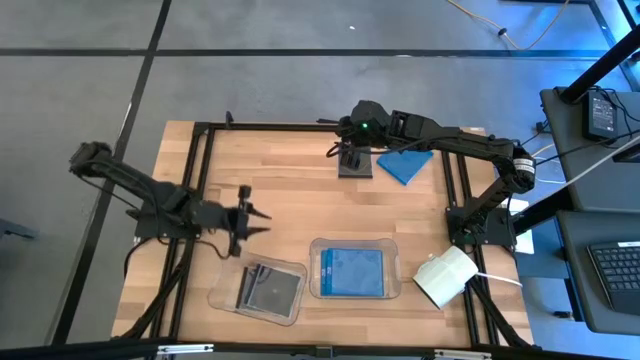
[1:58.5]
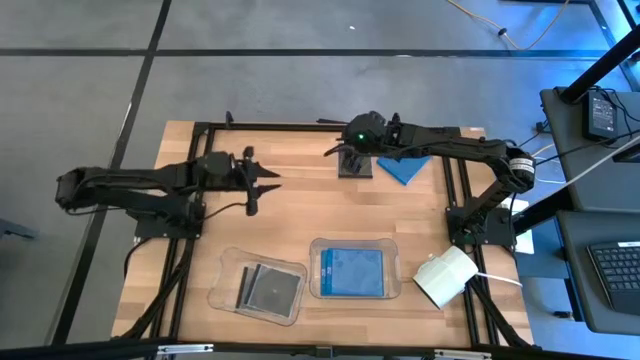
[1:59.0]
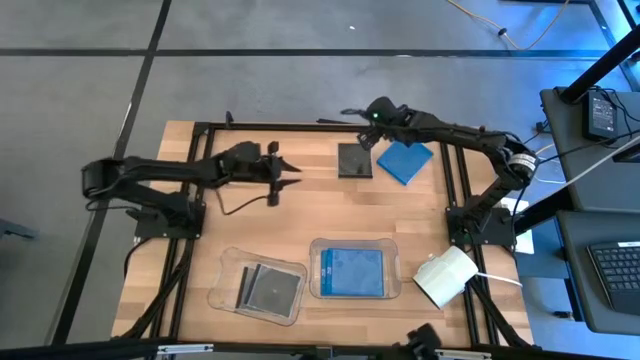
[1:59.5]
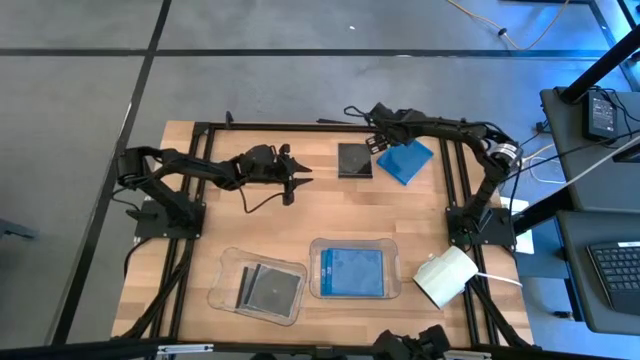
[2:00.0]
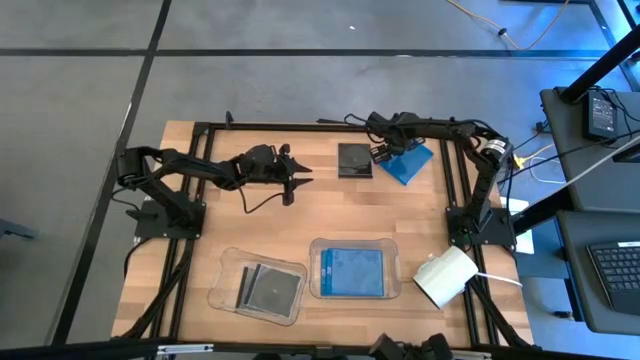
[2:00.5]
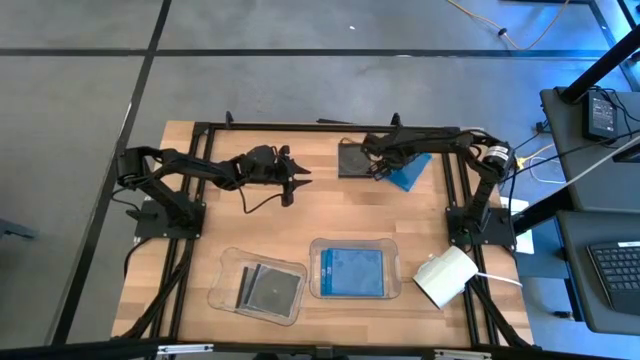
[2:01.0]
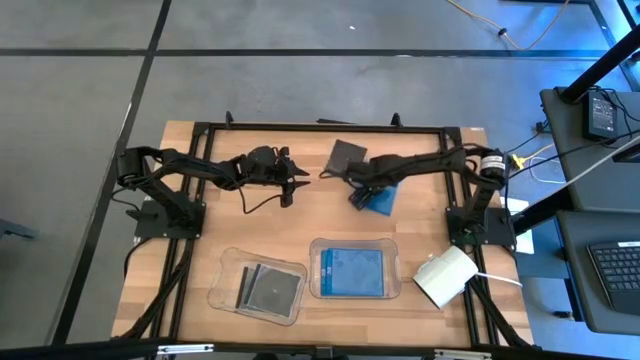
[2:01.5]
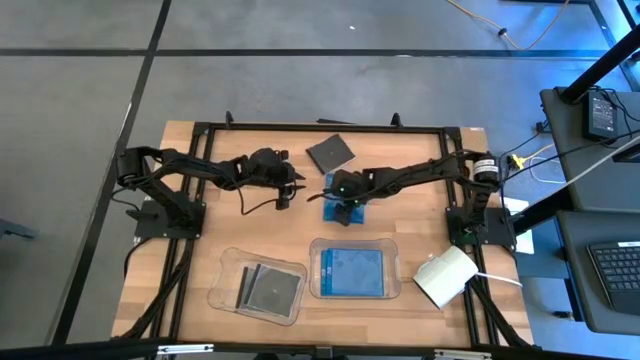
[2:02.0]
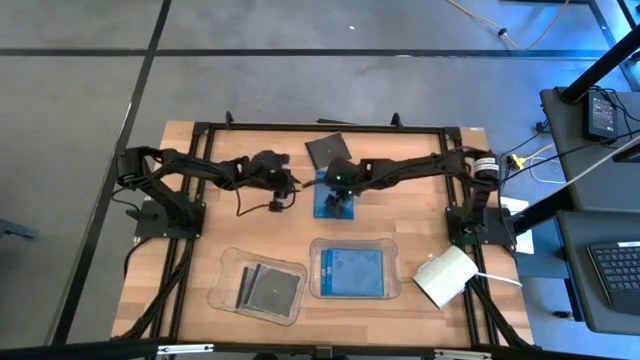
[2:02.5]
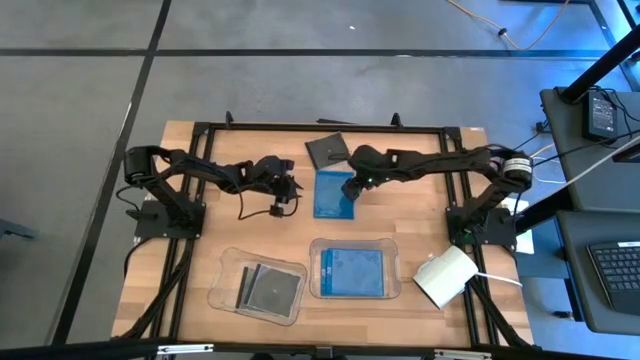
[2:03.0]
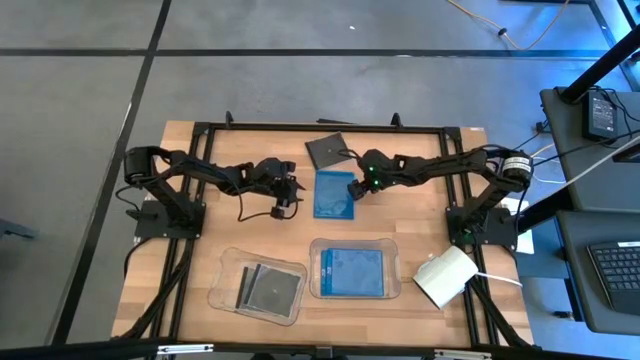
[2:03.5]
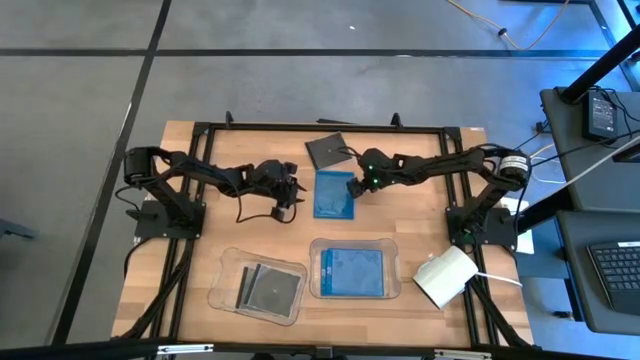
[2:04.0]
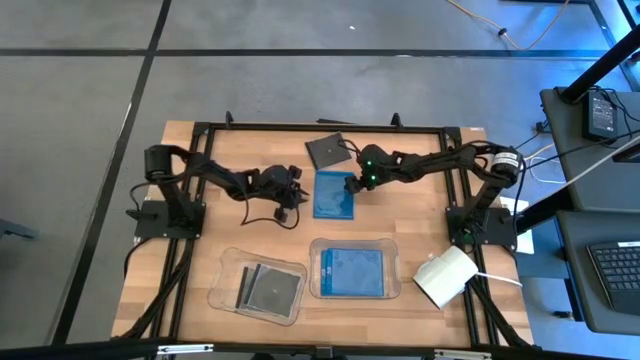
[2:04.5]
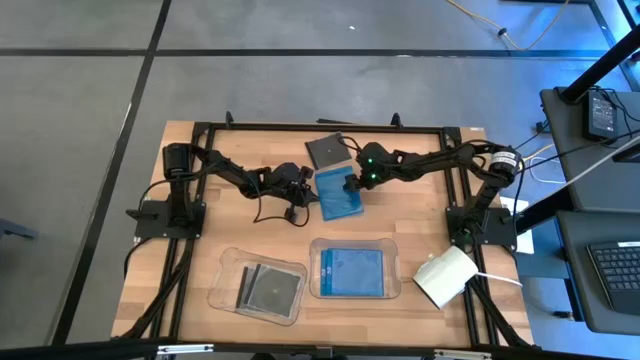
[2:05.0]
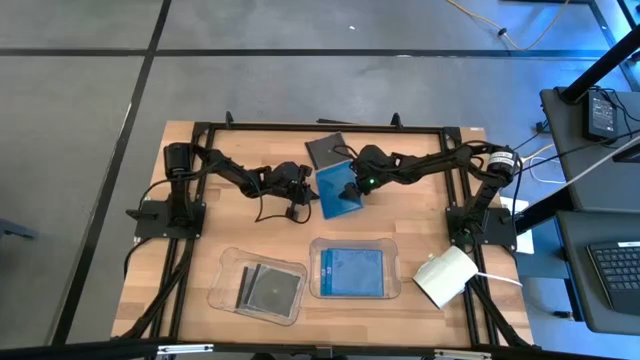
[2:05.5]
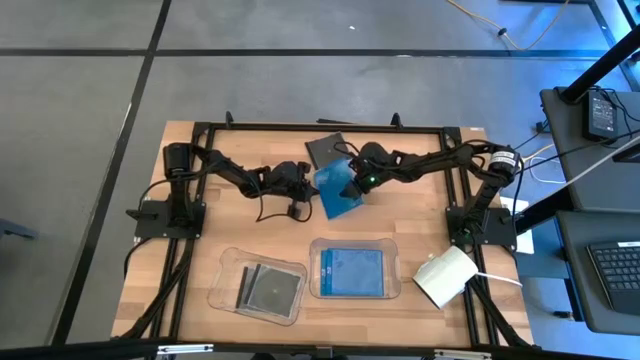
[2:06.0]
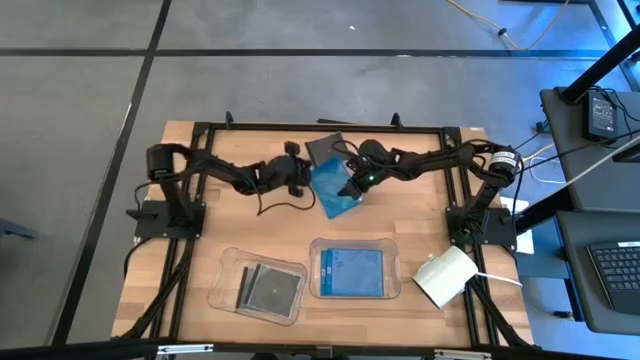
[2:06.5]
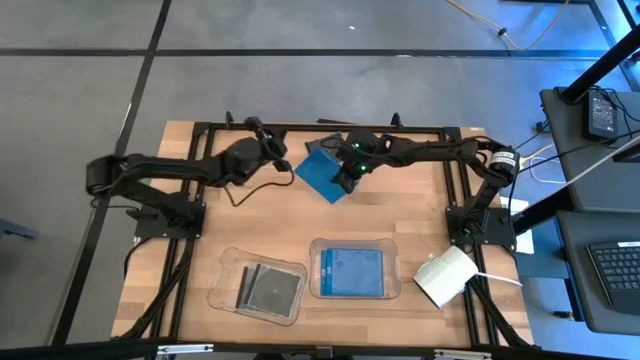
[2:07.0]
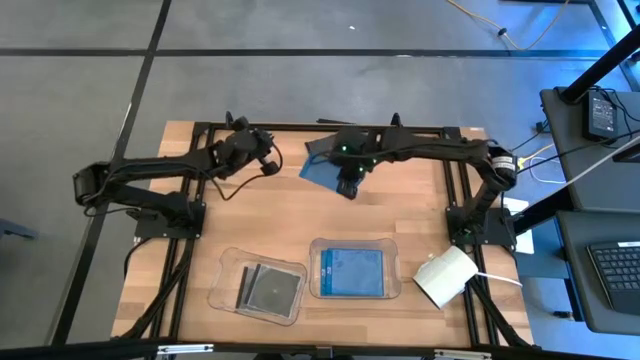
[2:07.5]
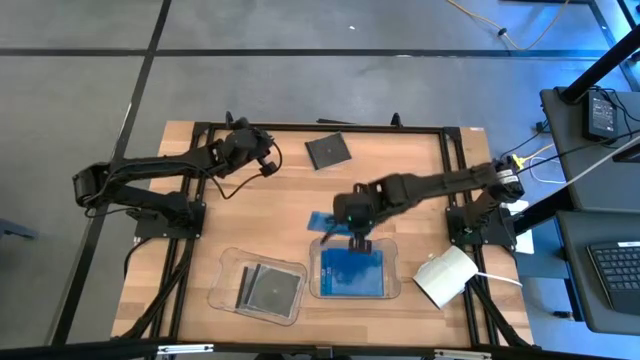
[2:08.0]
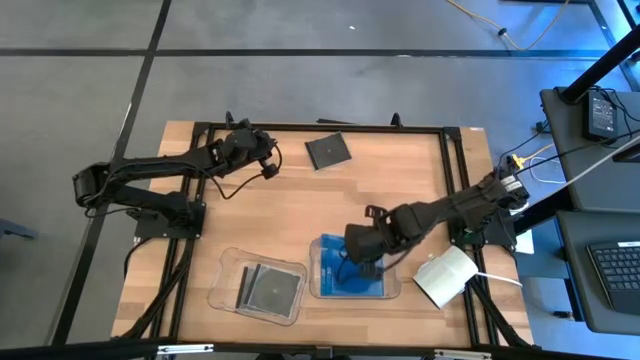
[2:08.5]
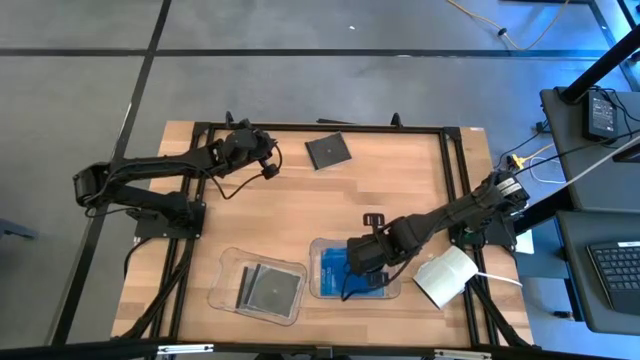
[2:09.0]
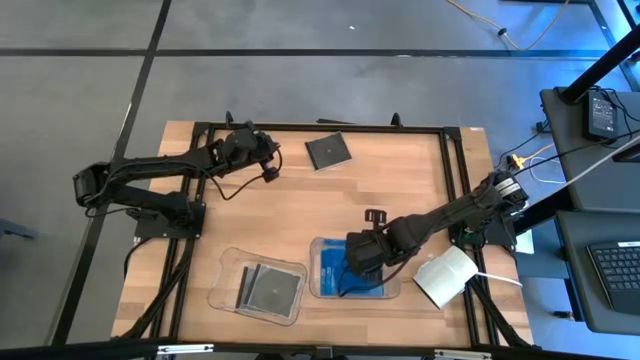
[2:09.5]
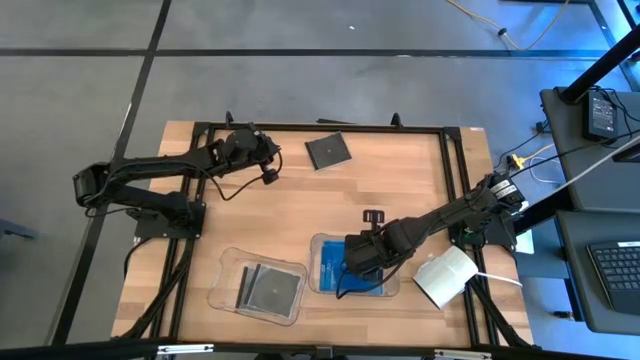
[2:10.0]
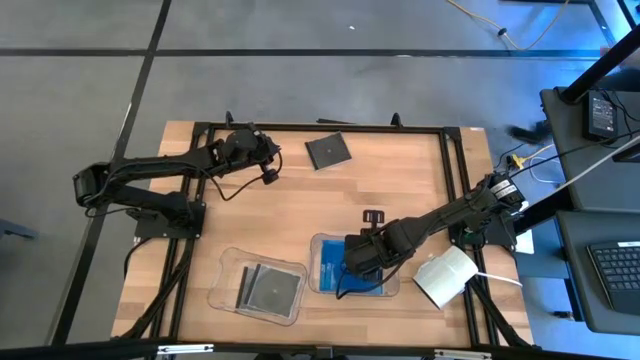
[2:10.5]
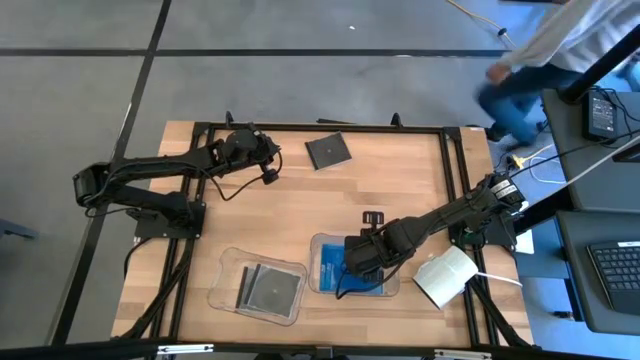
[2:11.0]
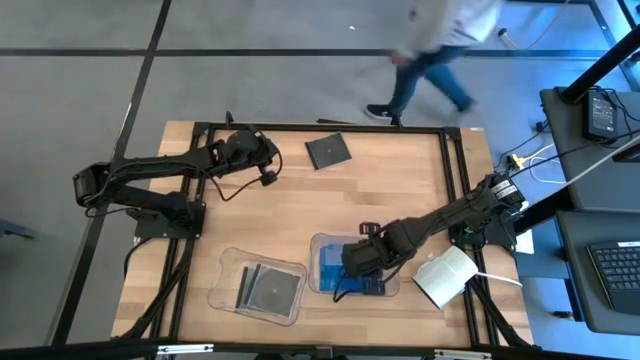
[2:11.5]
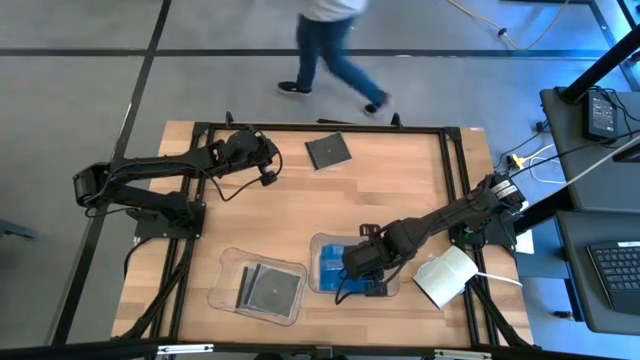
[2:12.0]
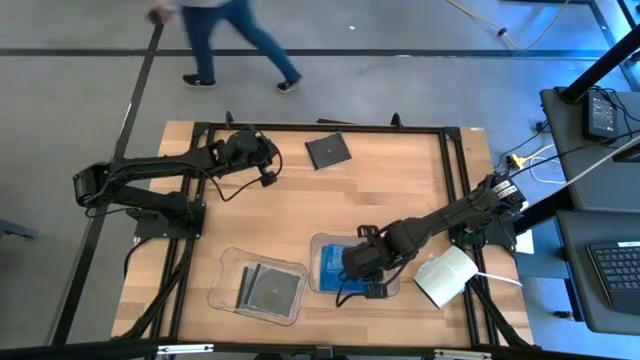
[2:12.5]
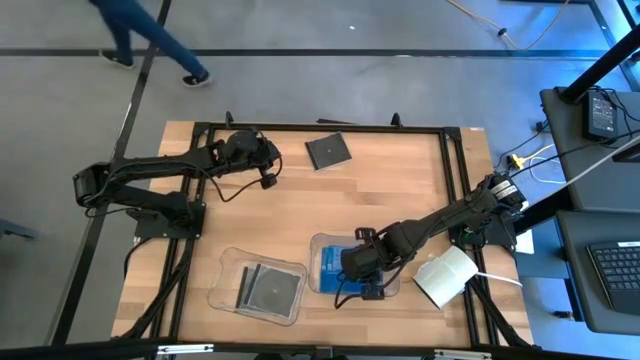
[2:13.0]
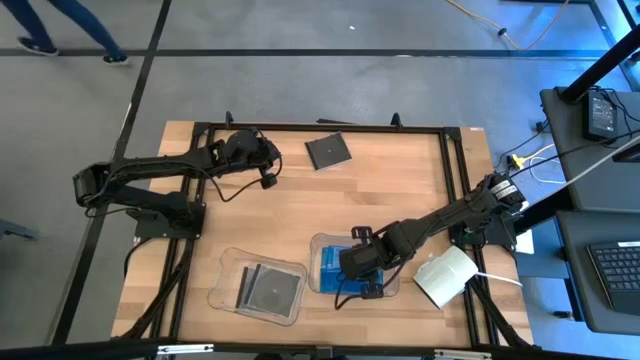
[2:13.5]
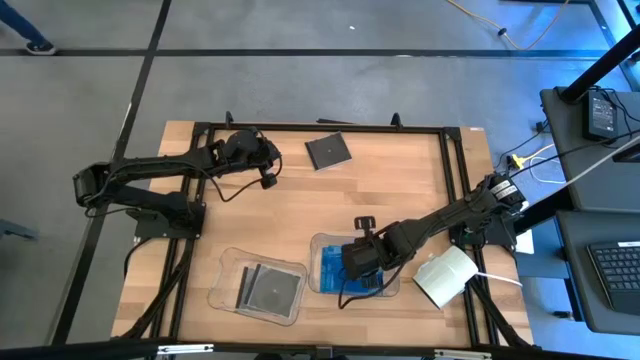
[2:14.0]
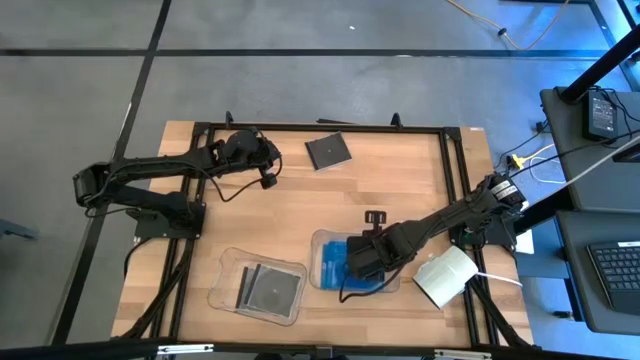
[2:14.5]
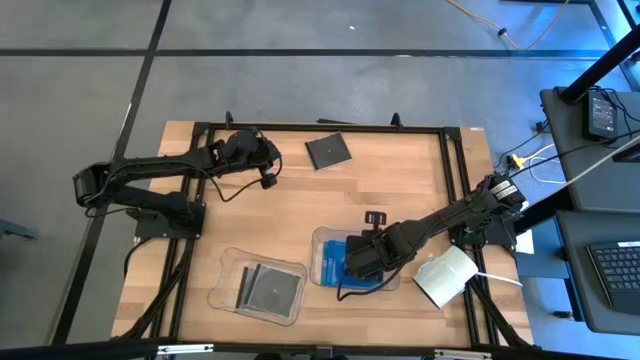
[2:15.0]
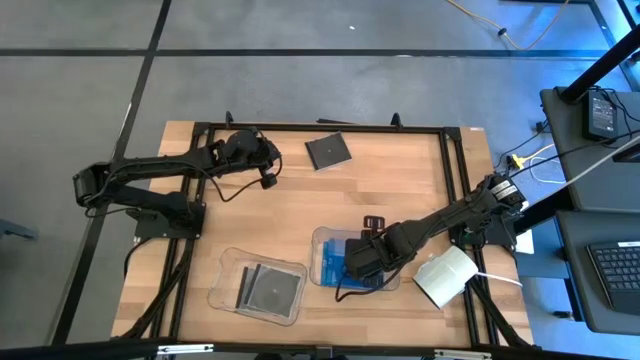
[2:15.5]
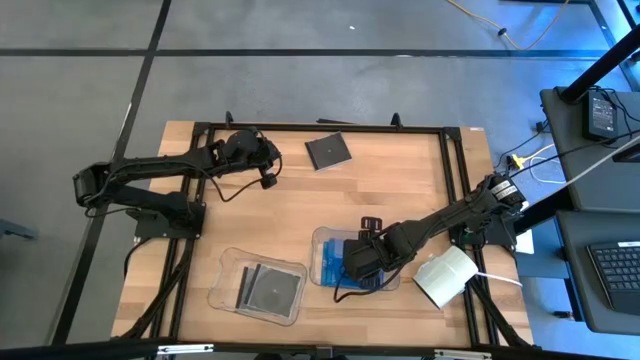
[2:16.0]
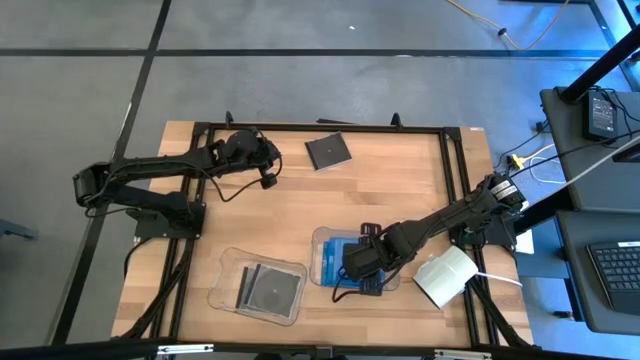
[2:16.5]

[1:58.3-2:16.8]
Task: Pick & place jewel cases by type
Put the blue CD case into the right transparent bin
